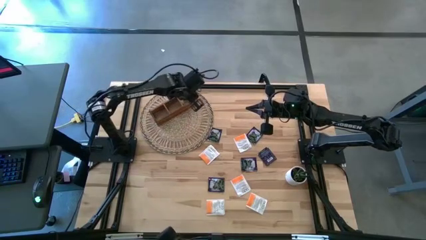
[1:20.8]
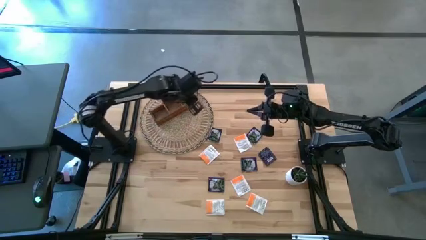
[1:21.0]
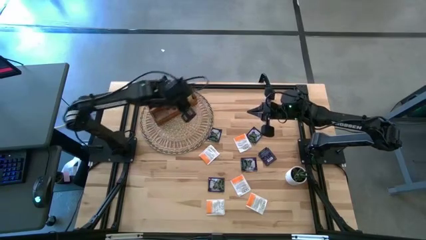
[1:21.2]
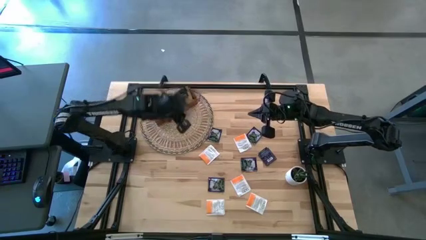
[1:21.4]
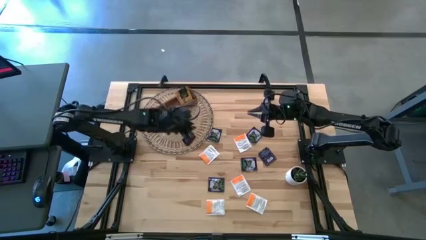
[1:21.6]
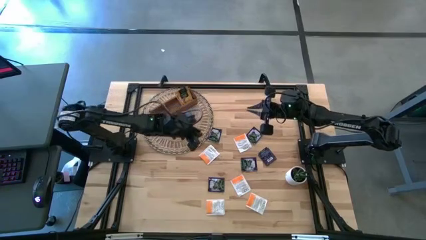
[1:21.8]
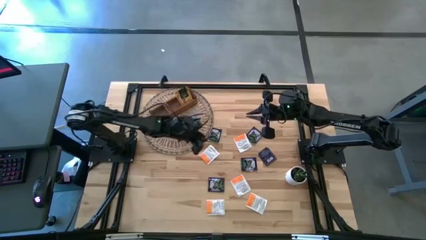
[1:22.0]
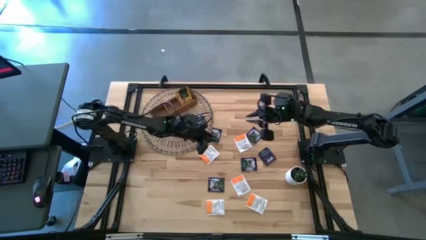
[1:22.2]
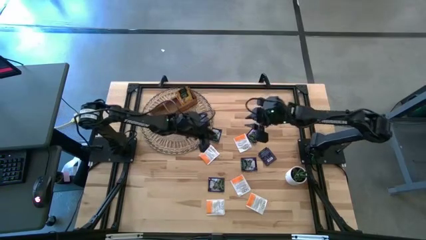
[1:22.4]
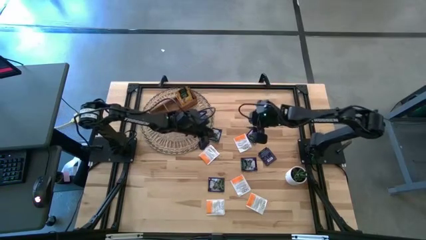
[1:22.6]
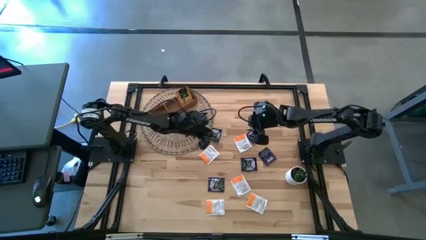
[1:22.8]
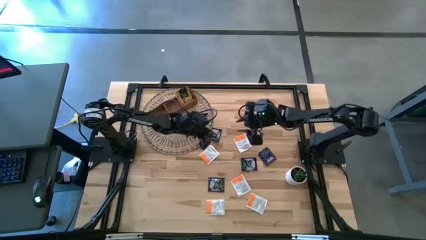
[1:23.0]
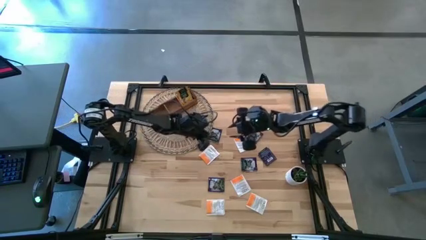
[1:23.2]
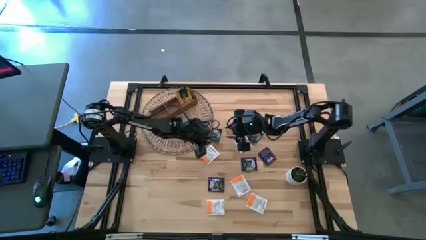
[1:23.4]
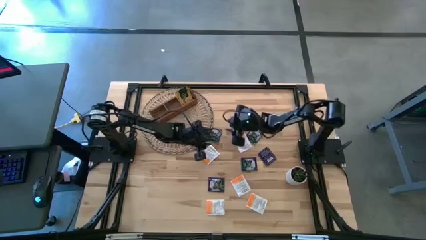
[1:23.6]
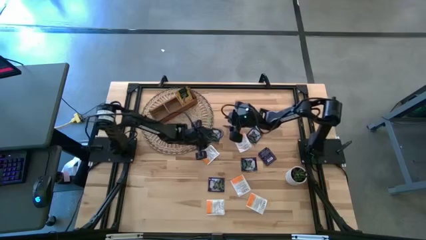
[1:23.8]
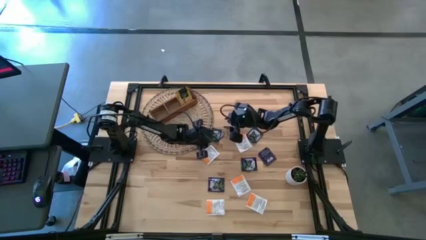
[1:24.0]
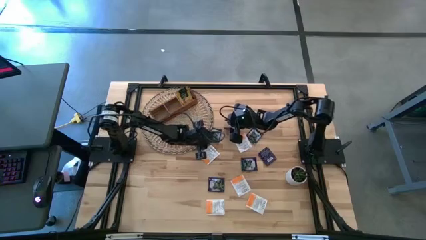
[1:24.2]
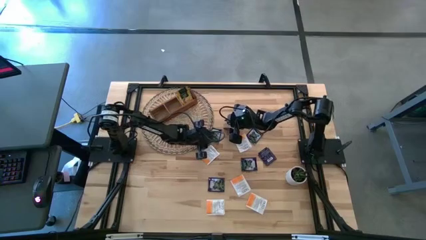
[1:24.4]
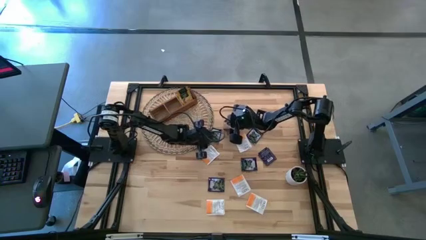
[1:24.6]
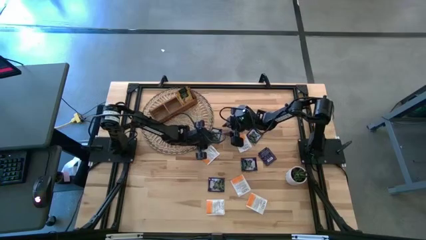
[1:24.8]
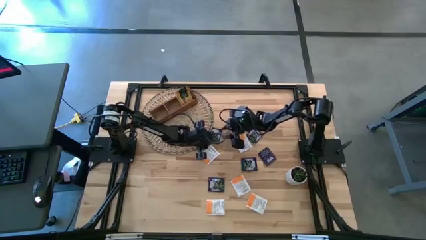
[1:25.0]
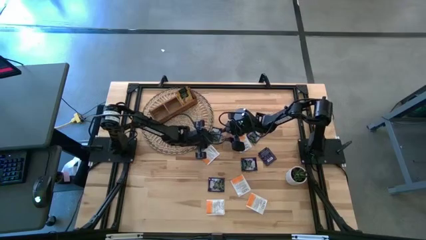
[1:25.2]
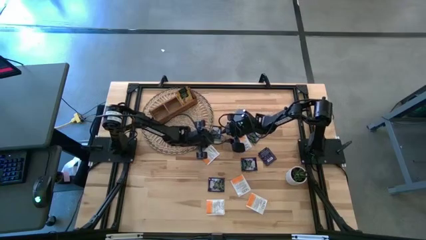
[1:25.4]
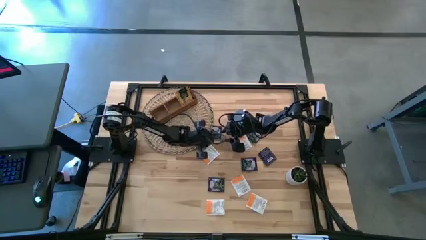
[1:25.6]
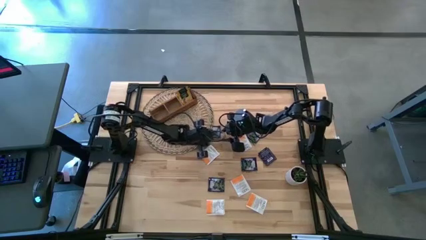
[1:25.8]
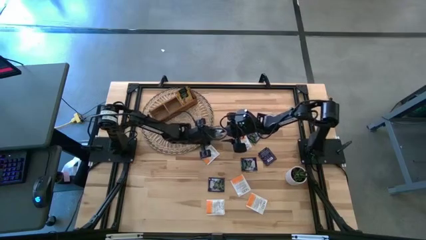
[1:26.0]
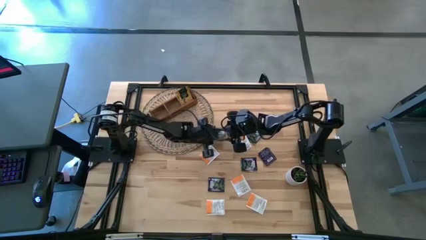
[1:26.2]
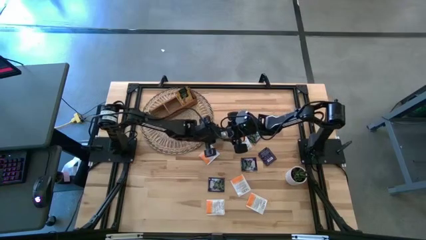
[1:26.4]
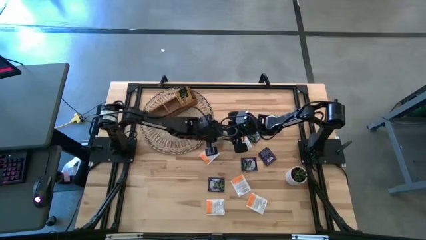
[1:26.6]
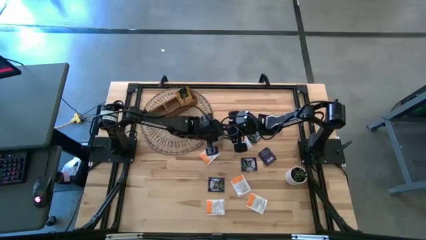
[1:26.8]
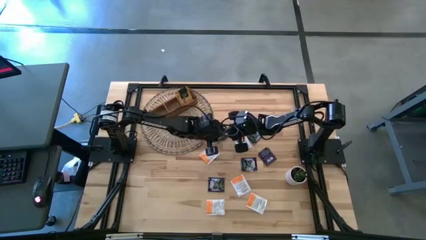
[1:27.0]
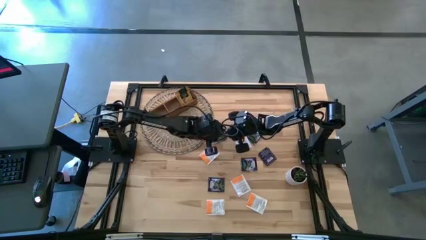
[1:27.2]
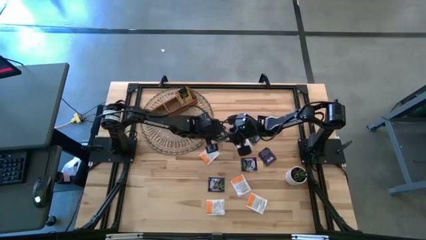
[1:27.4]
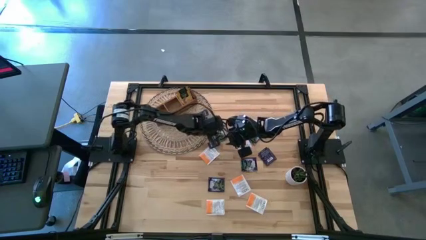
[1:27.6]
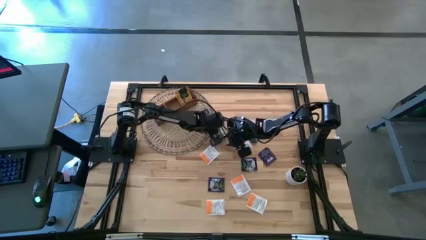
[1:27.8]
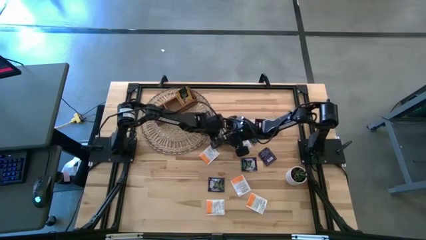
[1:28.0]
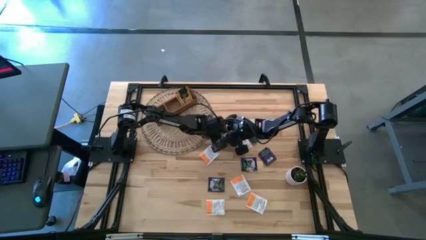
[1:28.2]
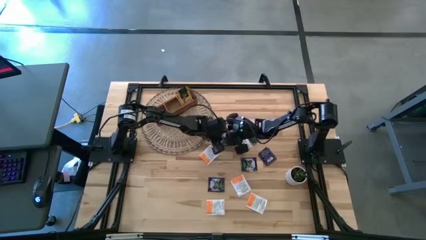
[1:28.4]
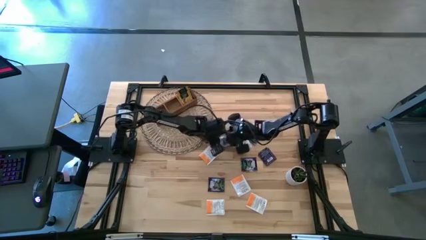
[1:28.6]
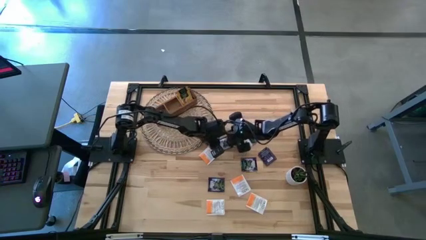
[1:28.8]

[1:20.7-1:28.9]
Task: Pick & Place Tea
Put the purple tea bag into the middle section of the wooden organizer

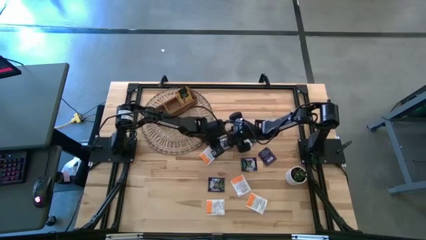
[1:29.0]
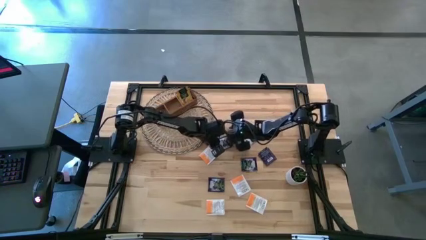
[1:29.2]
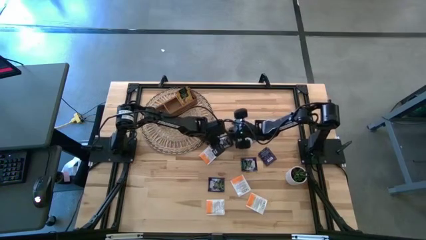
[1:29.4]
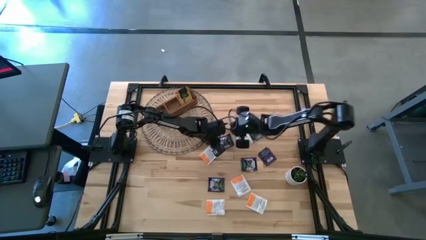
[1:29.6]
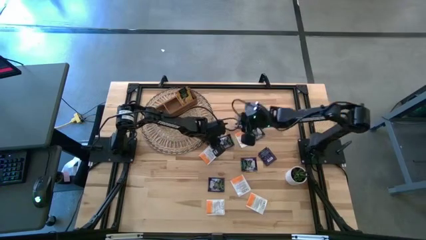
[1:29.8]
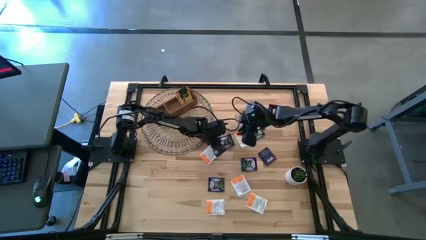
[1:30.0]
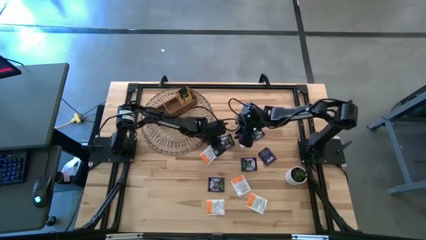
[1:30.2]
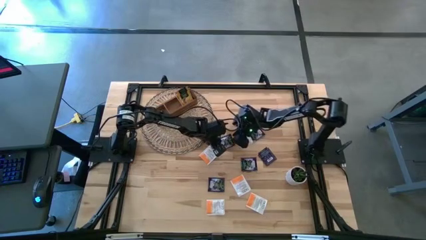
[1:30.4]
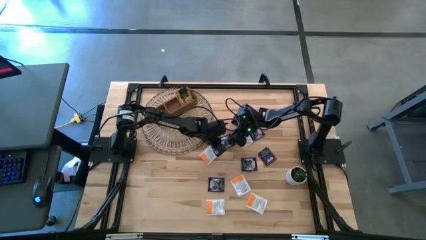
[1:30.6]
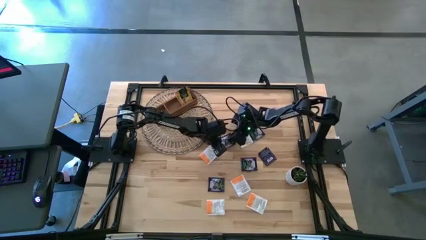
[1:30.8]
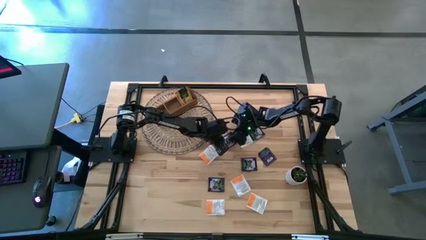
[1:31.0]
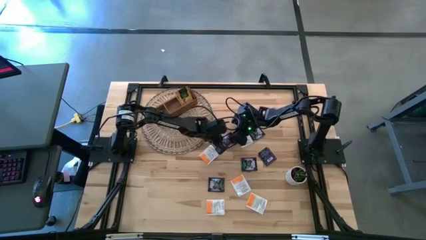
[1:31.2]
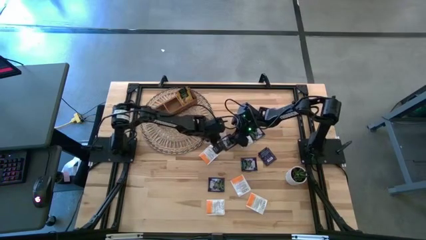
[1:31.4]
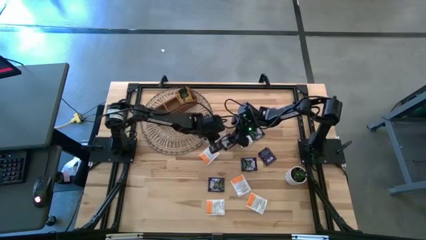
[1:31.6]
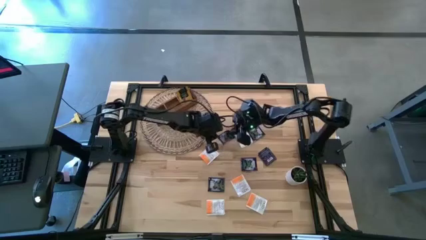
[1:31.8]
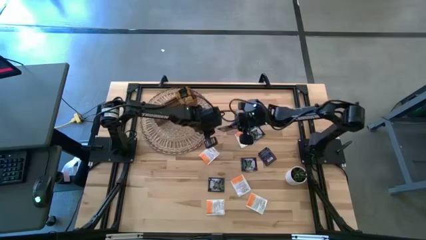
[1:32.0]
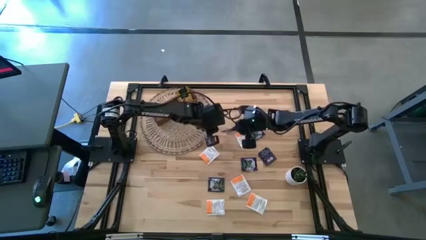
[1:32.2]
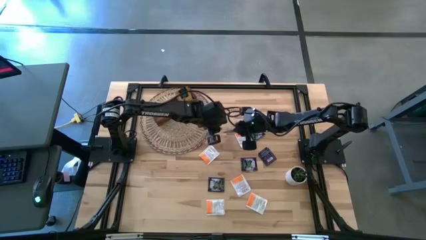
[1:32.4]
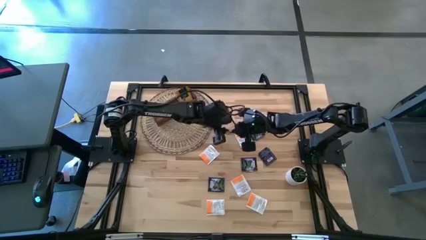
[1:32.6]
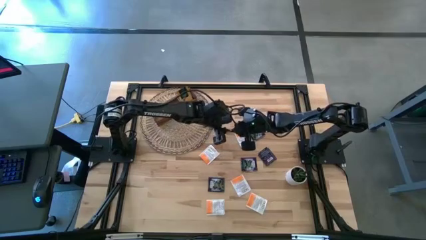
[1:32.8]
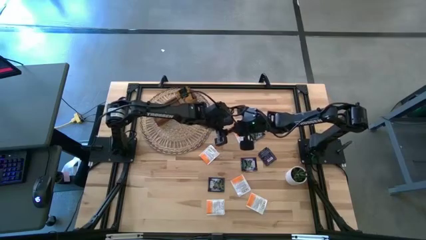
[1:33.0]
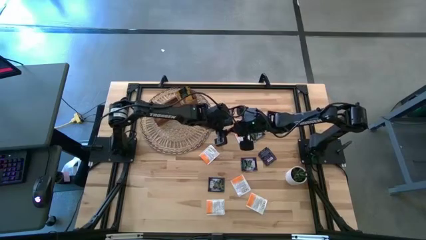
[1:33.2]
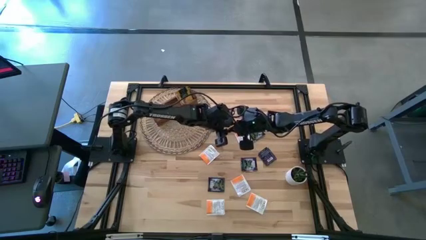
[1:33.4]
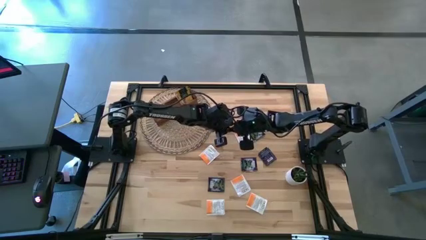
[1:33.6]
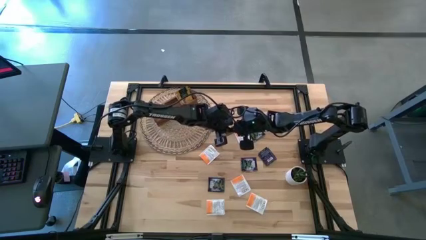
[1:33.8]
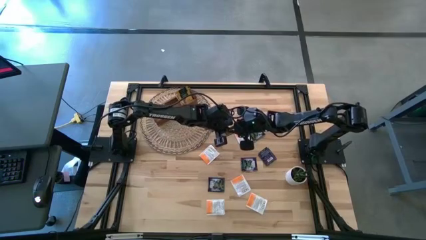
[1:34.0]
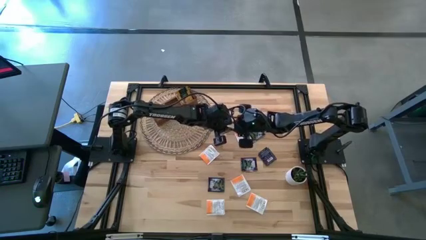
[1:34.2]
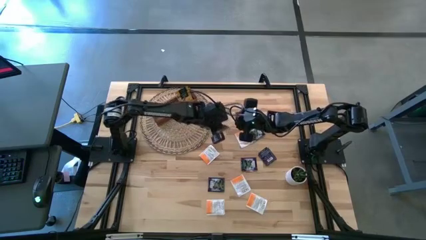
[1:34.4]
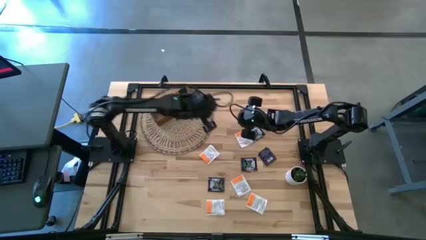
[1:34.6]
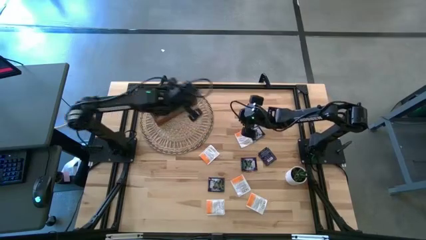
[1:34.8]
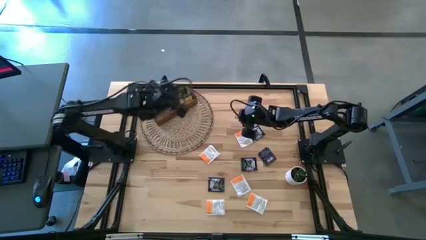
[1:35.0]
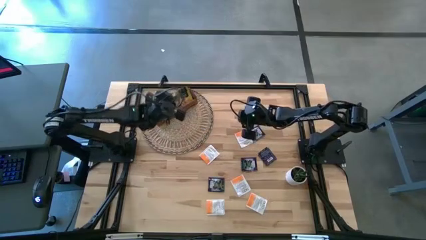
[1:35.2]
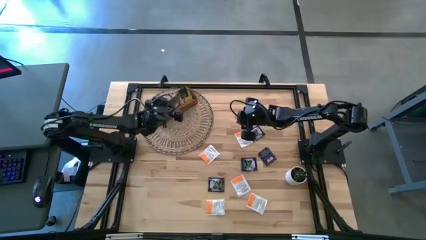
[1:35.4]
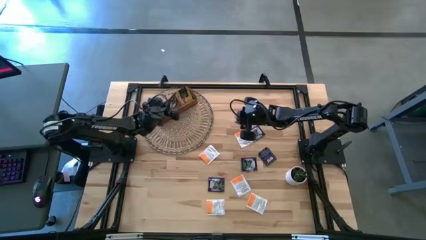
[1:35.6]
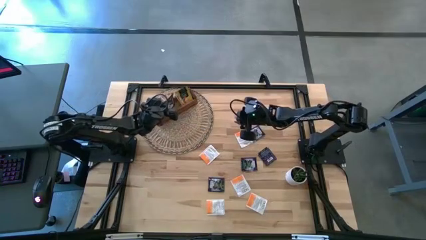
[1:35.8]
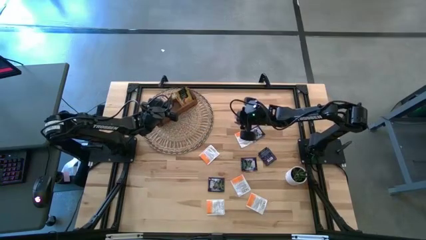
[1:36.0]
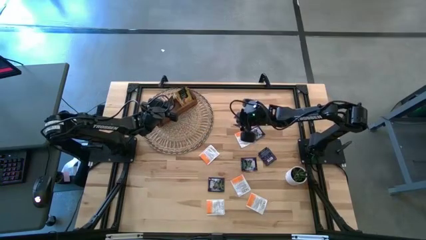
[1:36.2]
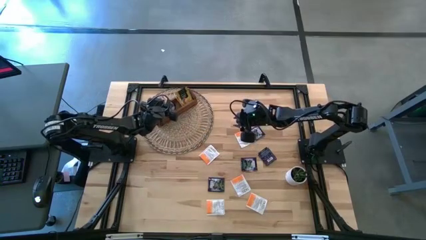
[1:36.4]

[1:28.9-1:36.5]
Put the purple tea bag into the middle section of the wooden organizer

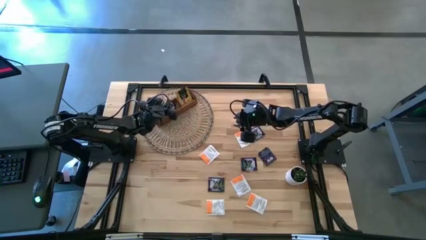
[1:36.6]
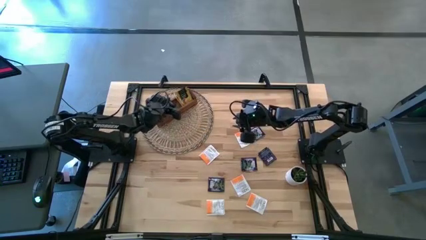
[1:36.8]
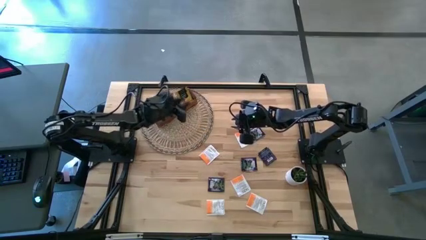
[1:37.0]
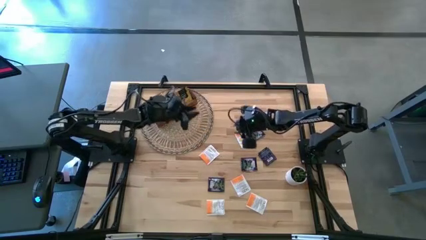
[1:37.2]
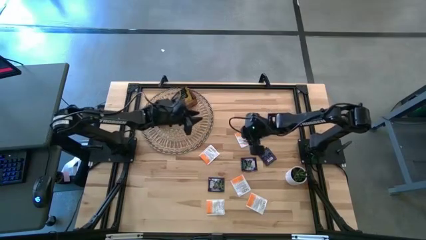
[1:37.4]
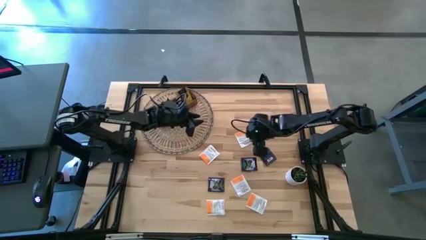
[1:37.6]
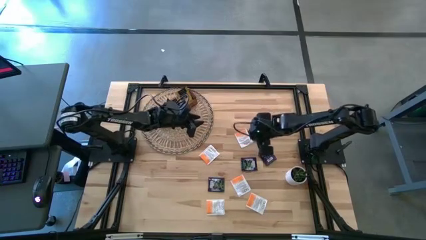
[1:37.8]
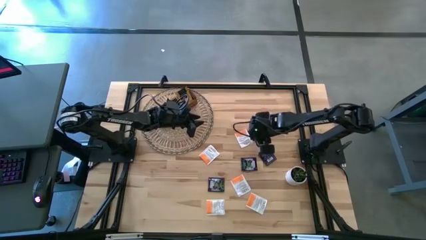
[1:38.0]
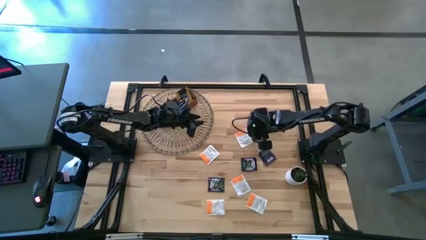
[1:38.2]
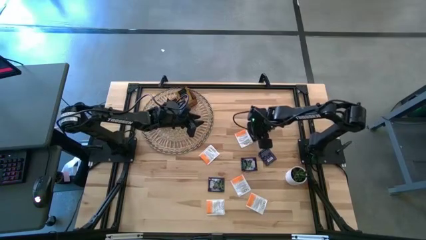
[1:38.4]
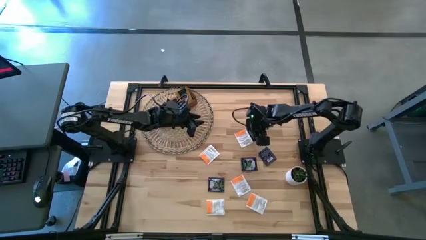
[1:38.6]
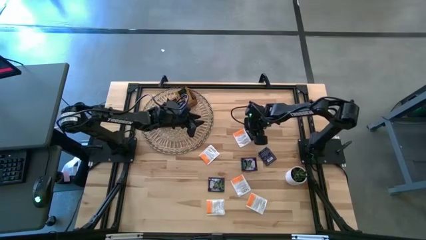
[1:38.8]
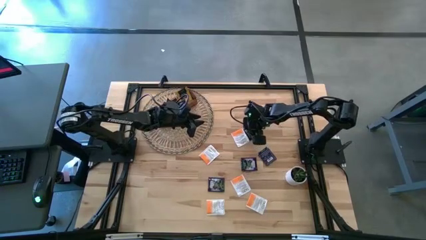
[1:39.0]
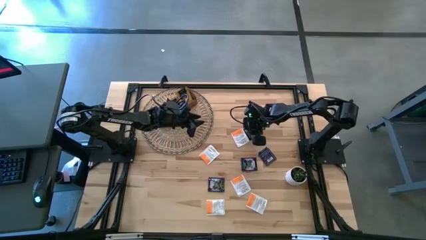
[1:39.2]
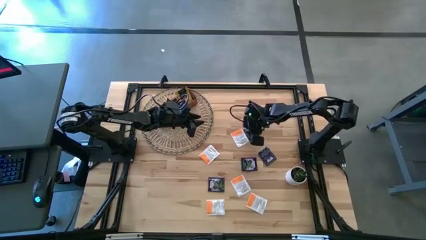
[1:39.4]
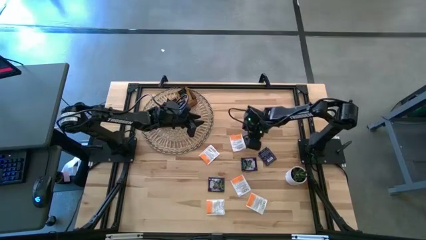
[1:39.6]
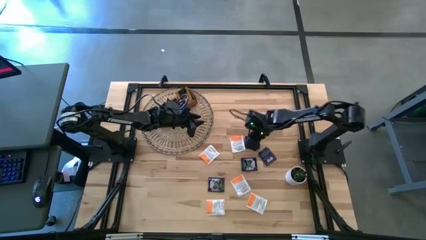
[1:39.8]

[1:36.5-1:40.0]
Put the purple tea bag into the middle section of the wooden organizer
